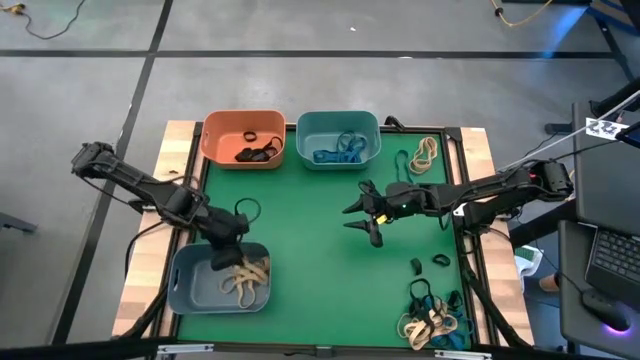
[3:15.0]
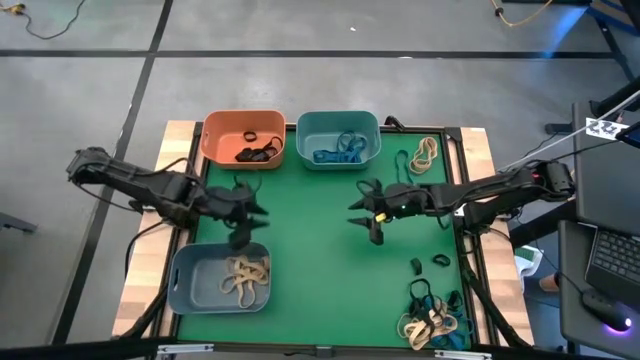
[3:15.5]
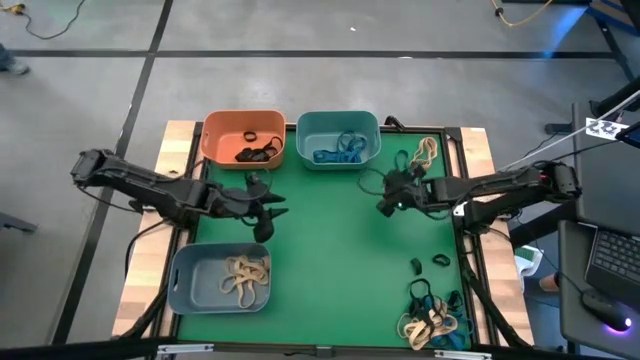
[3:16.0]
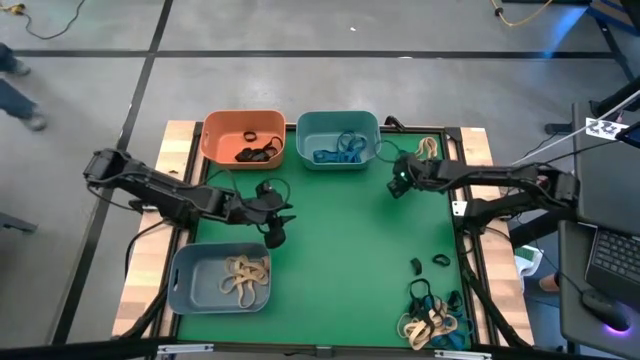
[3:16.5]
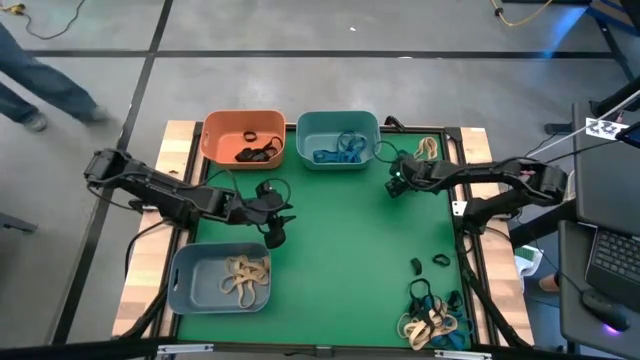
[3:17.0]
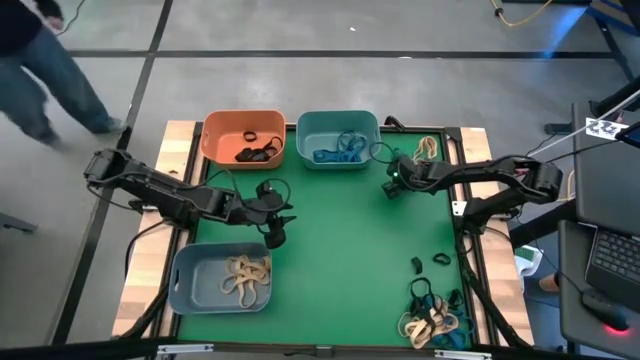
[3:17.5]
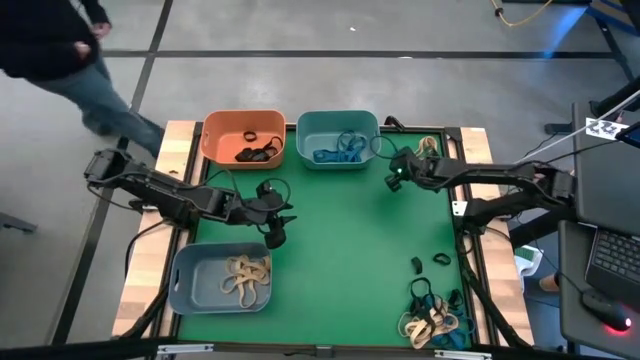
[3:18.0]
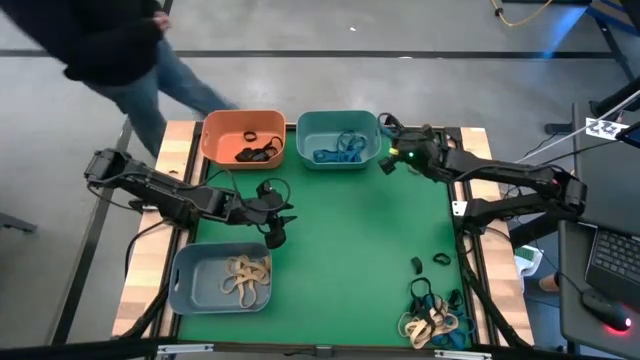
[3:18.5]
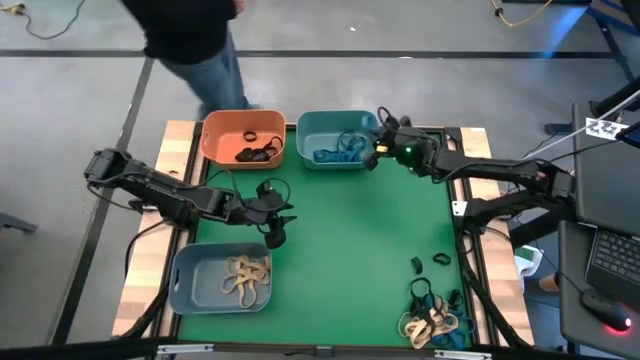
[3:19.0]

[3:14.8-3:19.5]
Task: Sort rubber bands into baskets
Put the blue rubber band into the green bin

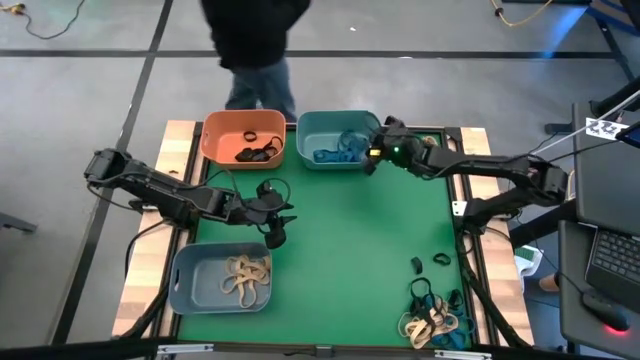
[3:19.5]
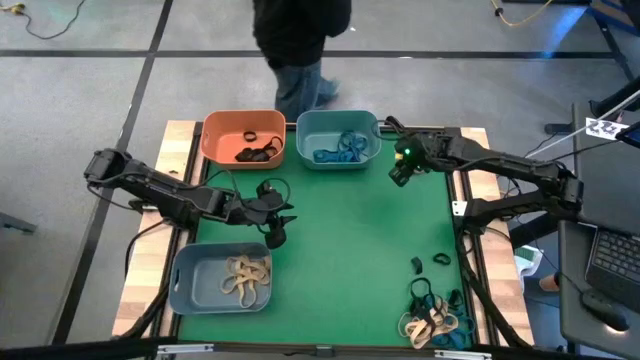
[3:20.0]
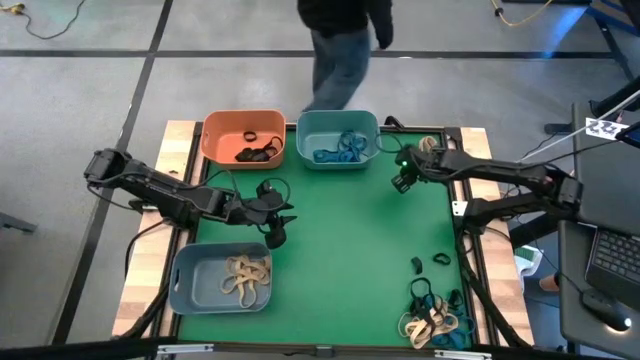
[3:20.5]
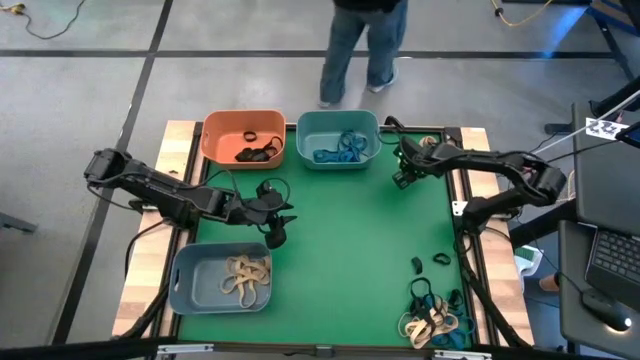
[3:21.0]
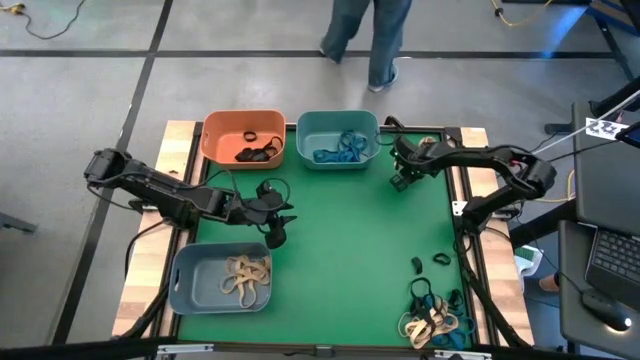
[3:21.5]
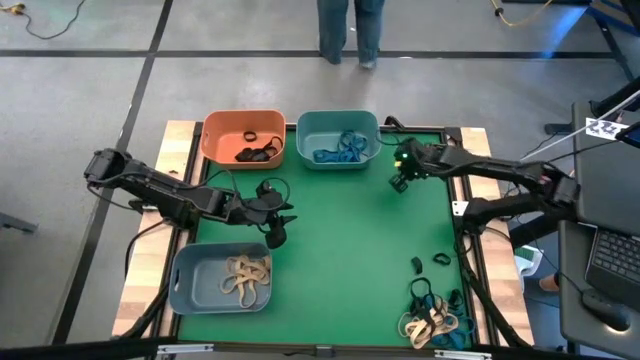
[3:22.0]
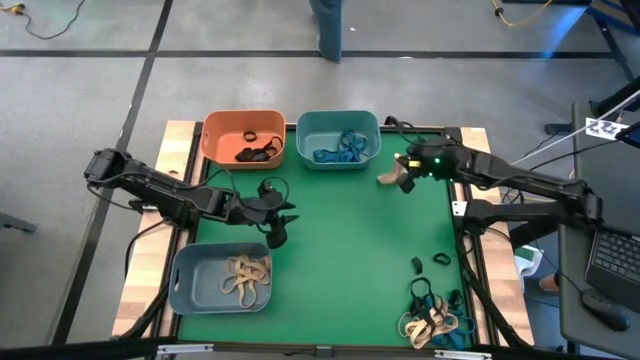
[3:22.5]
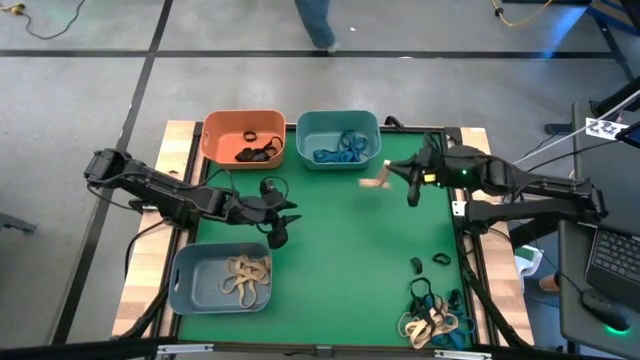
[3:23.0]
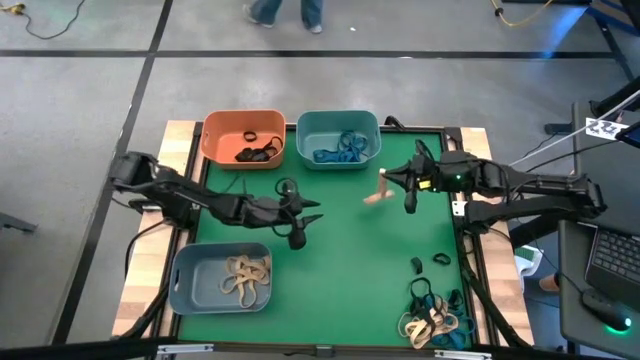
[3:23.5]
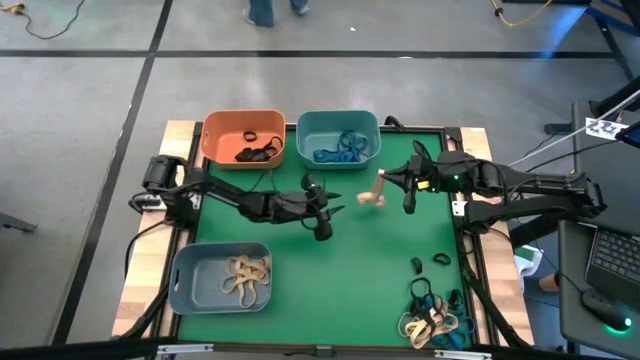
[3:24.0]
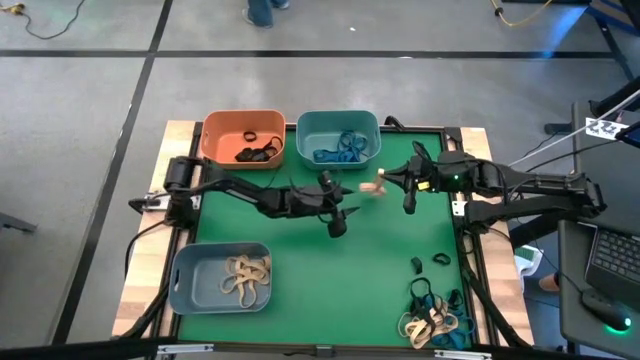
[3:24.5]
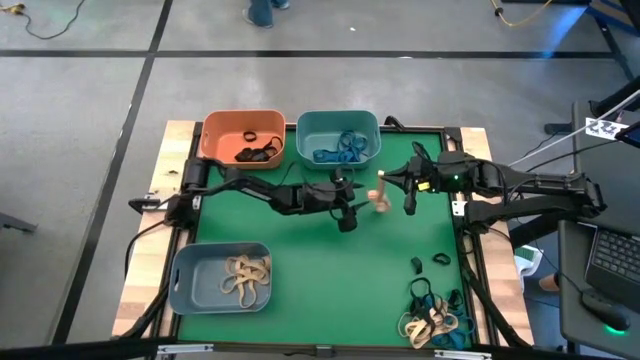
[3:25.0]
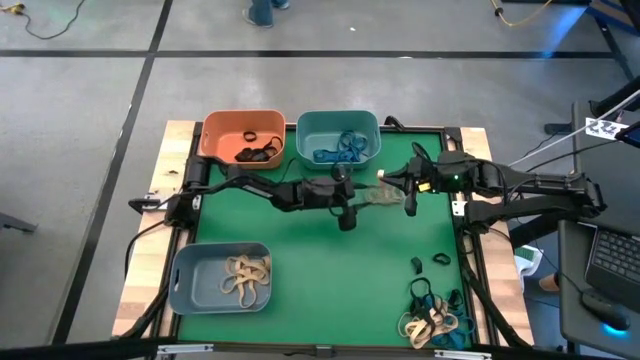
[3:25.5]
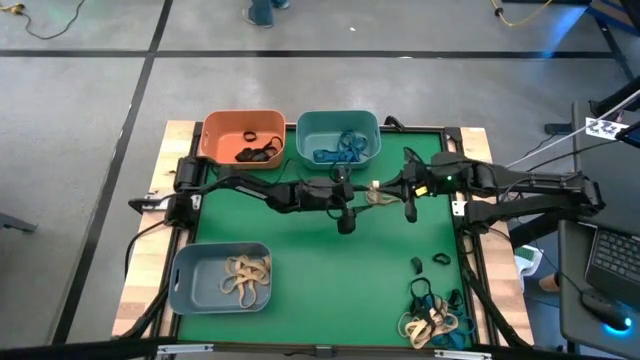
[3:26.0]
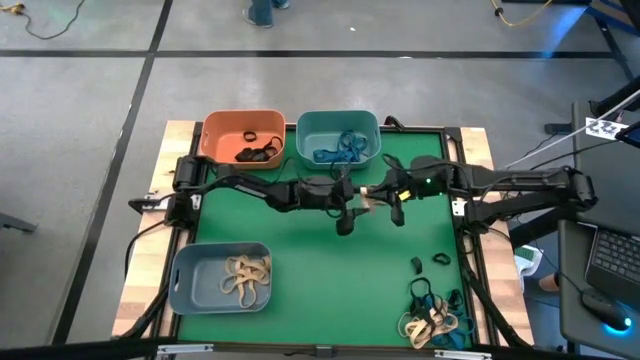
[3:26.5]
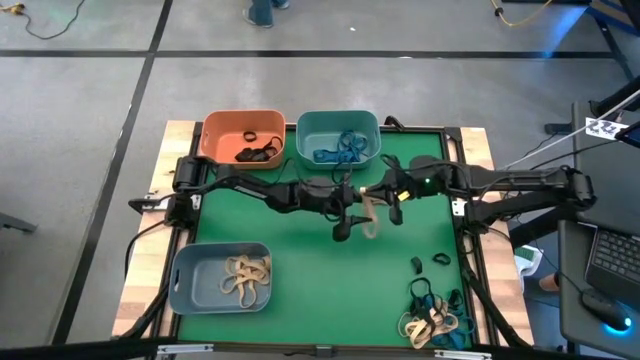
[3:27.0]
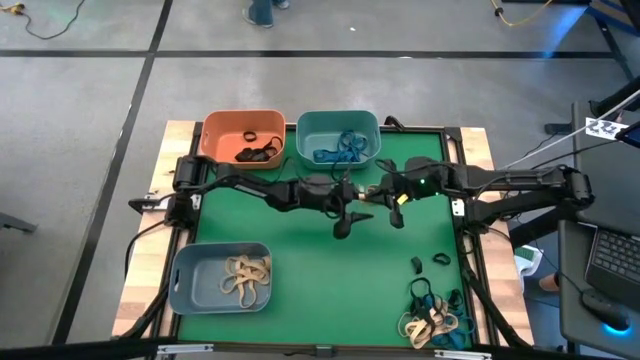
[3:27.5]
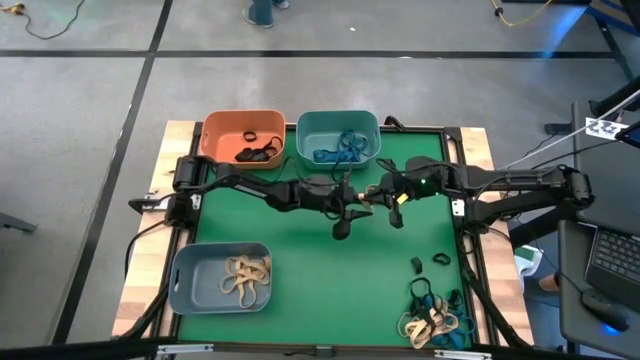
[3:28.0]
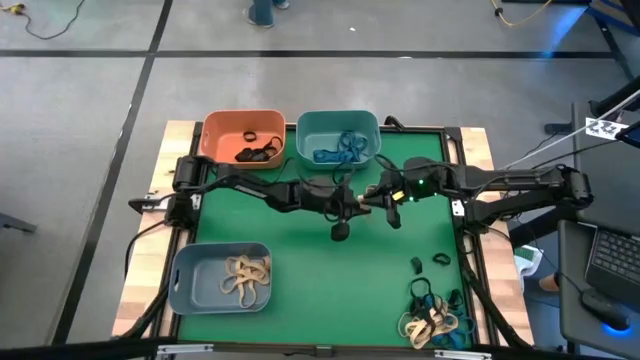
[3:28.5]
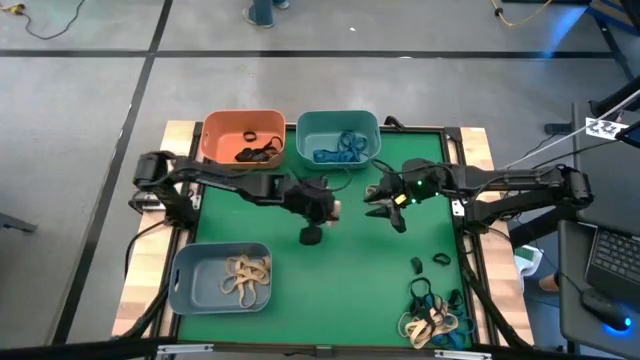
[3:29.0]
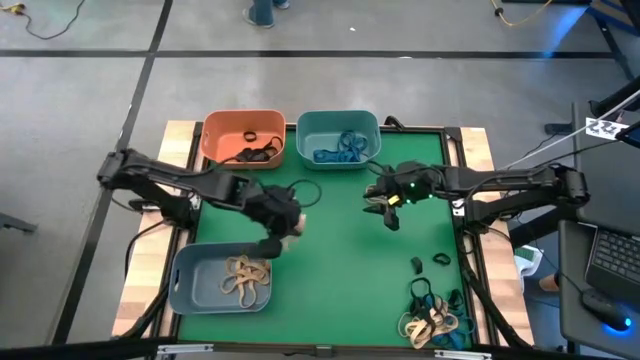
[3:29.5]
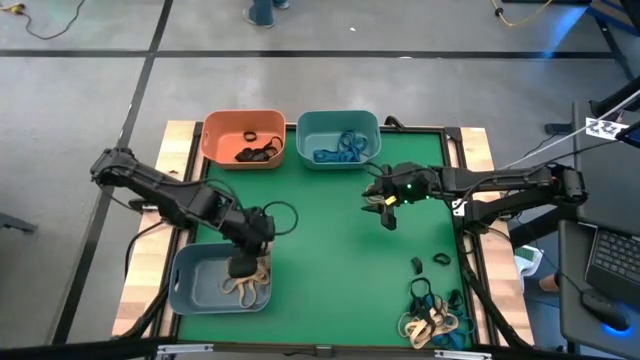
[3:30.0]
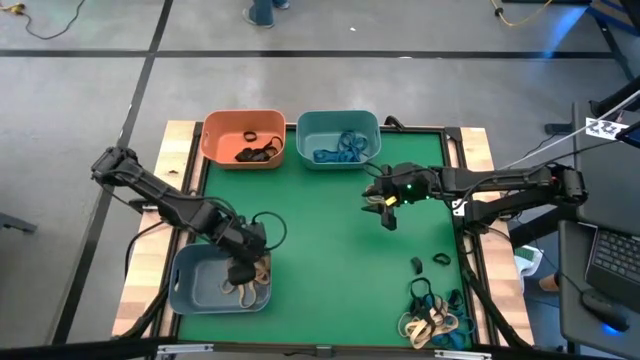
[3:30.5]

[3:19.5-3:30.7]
Put the white rubber band into the blue bin

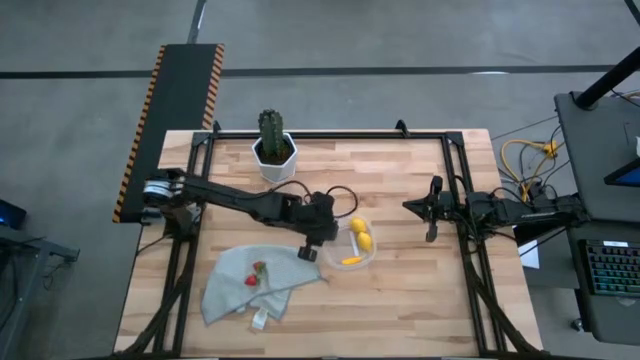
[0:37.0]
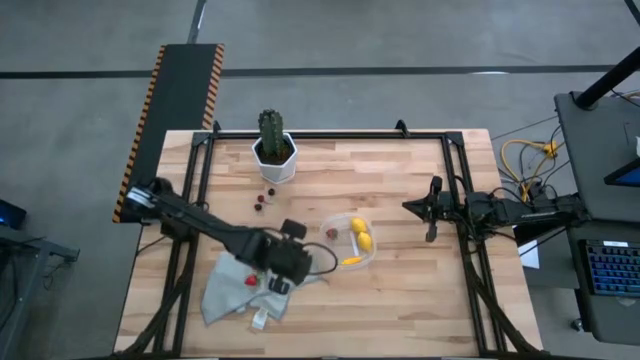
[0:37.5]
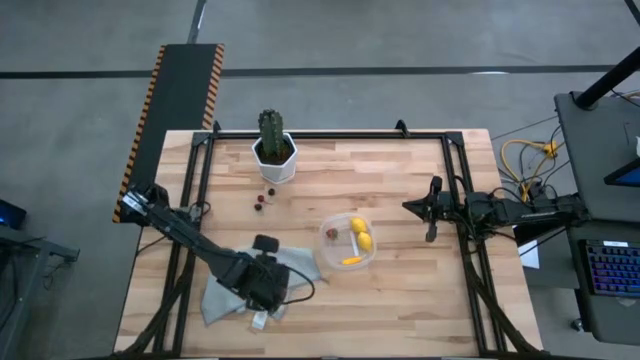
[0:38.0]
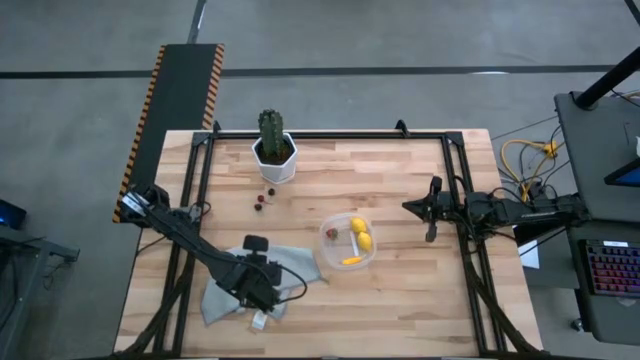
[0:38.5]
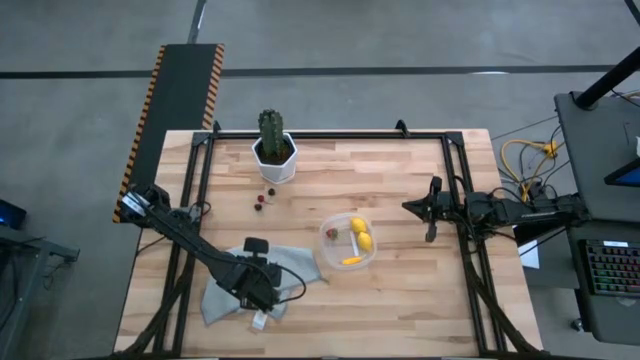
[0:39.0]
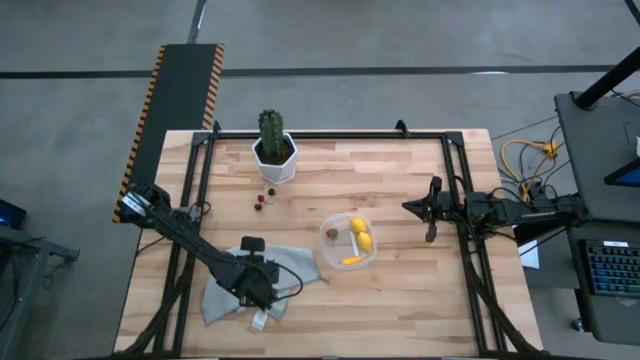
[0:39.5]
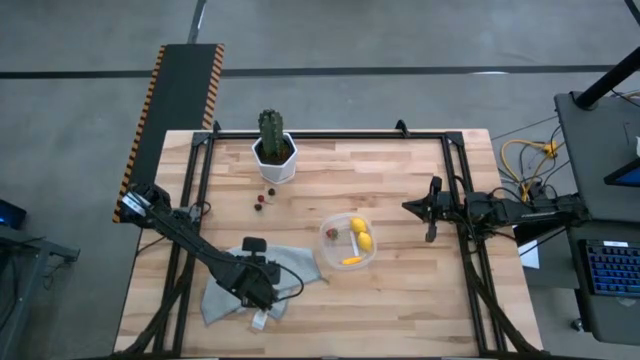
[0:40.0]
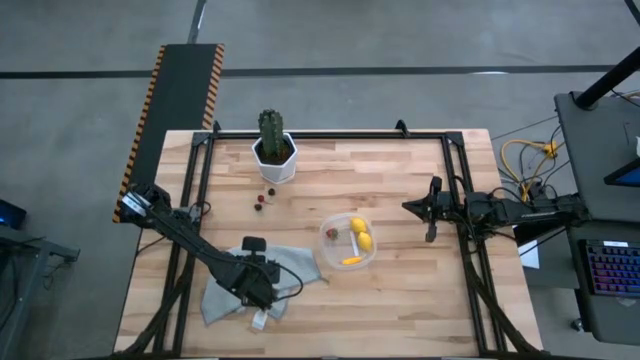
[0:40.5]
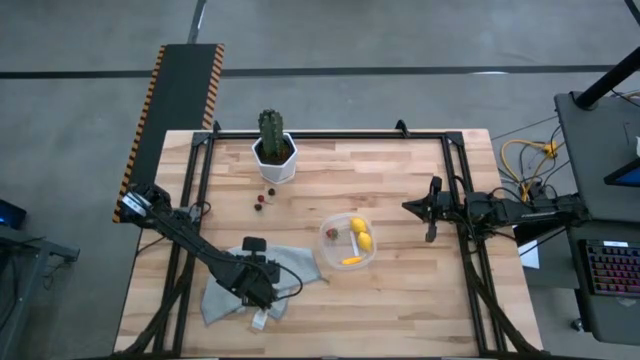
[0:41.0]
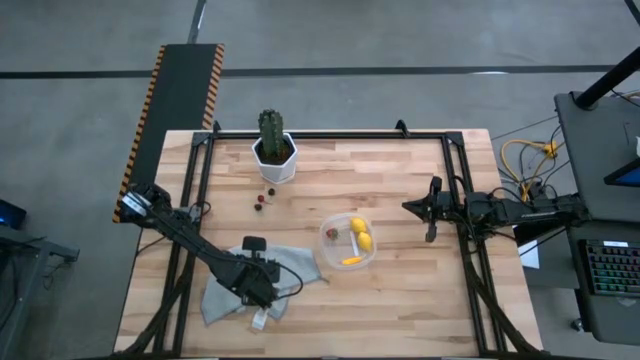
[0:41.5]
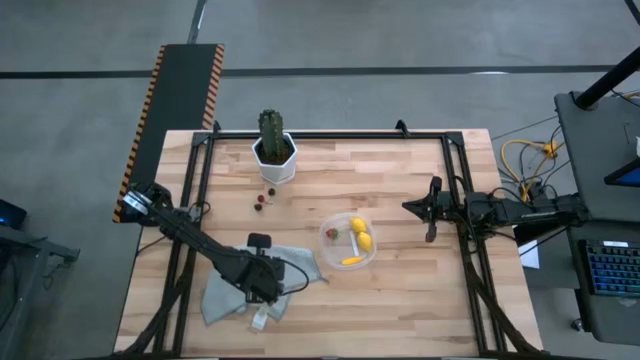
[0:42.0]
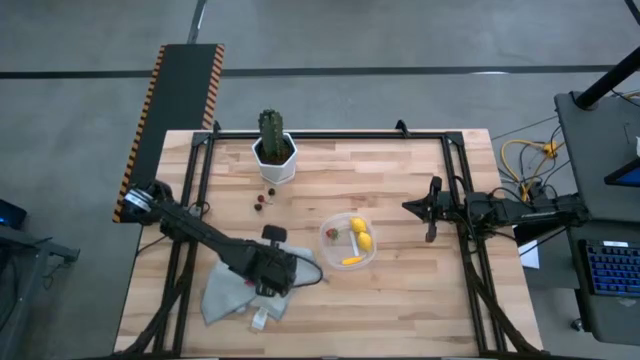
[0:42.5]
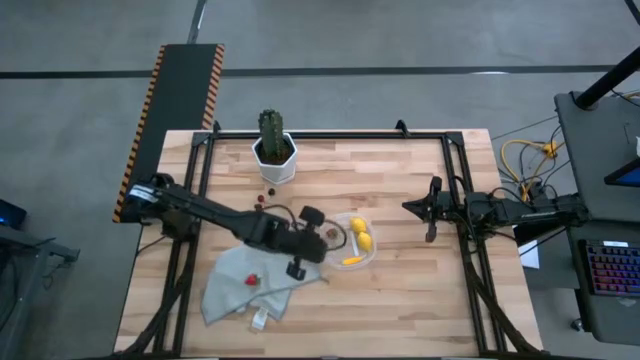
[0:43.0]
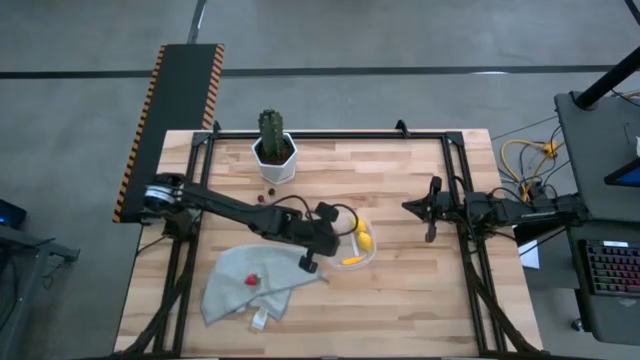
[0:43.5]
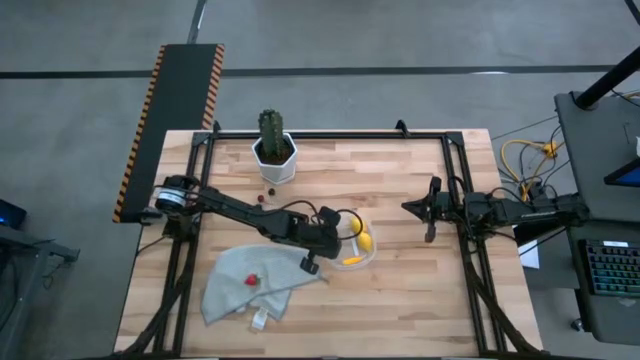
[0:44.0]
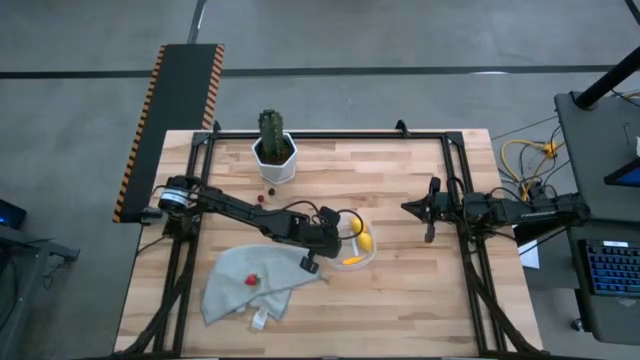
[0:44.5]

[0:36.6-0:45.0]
Task: Pick and placing Produce into tupperware
Put the top red strawberry into the transparent container
